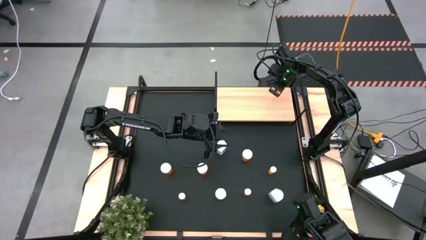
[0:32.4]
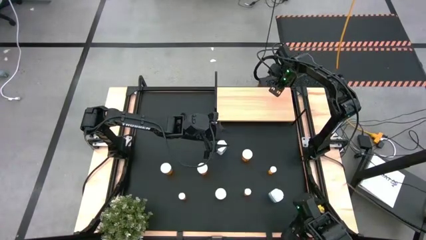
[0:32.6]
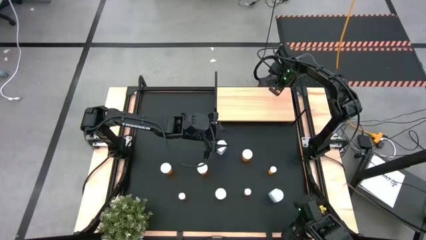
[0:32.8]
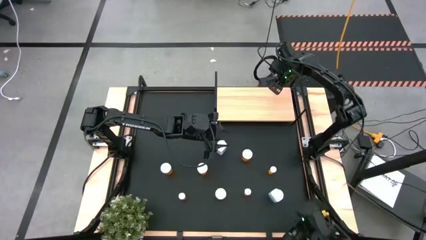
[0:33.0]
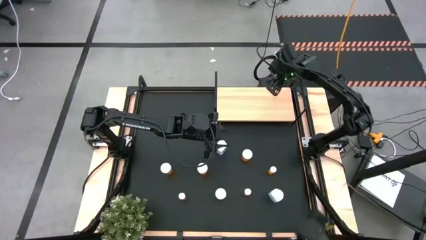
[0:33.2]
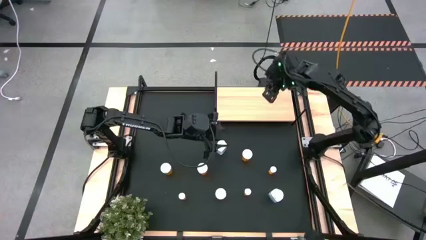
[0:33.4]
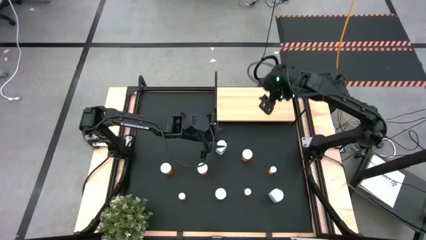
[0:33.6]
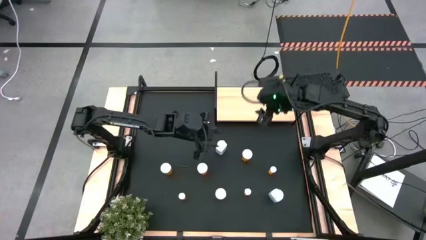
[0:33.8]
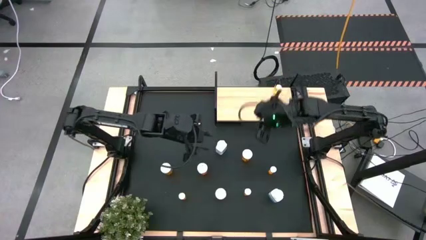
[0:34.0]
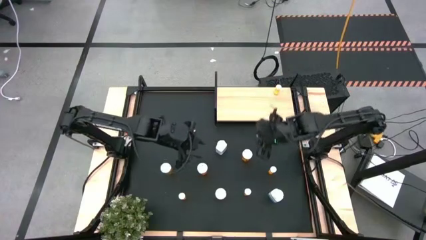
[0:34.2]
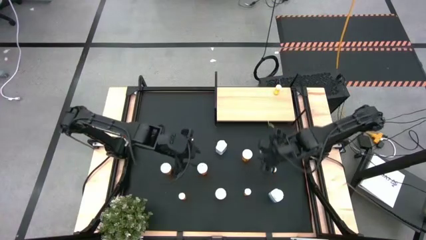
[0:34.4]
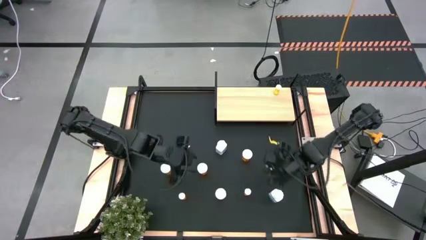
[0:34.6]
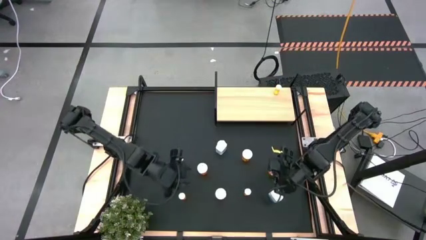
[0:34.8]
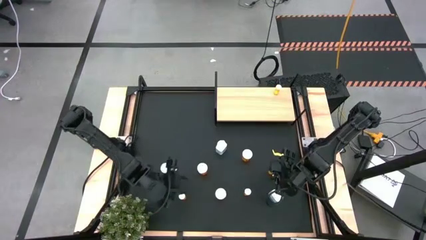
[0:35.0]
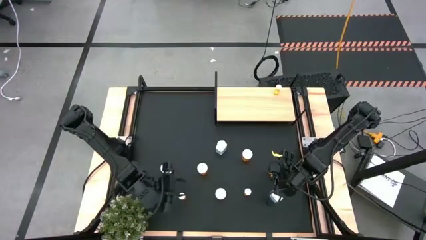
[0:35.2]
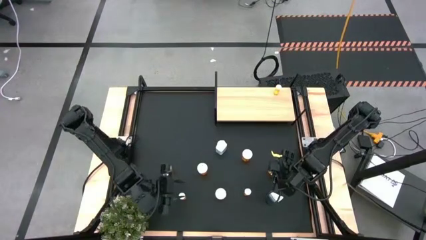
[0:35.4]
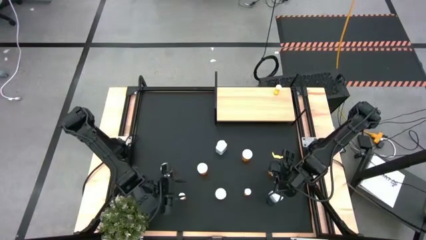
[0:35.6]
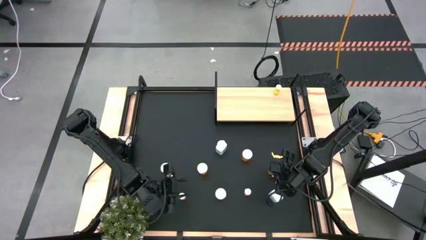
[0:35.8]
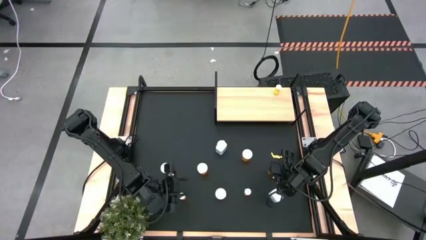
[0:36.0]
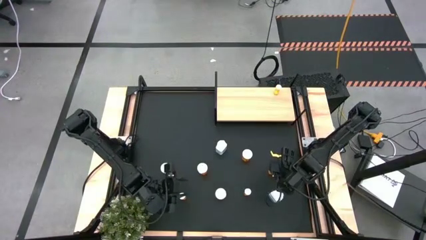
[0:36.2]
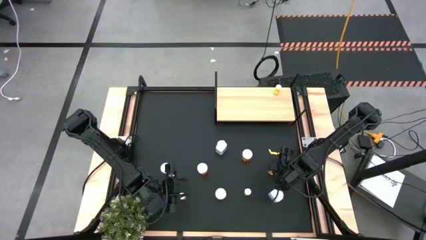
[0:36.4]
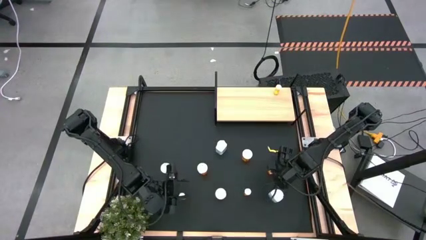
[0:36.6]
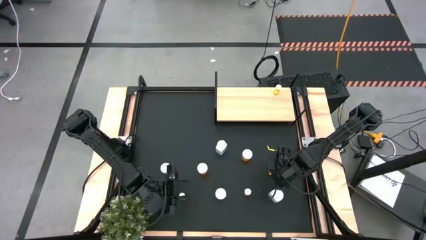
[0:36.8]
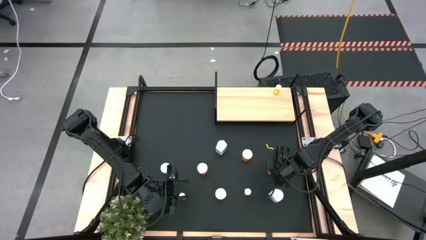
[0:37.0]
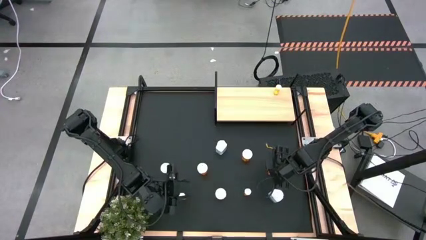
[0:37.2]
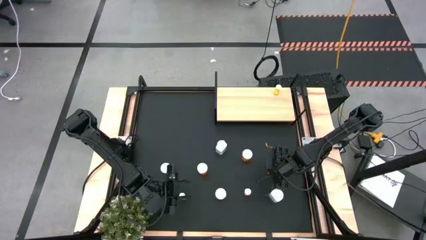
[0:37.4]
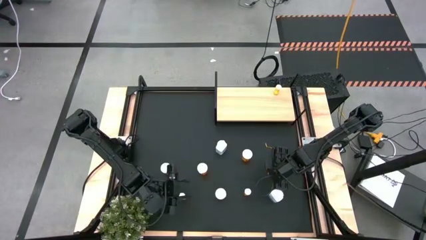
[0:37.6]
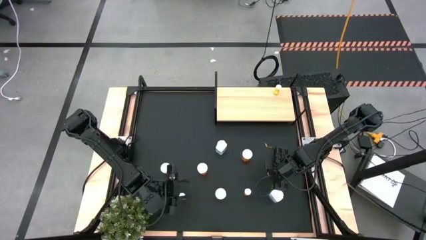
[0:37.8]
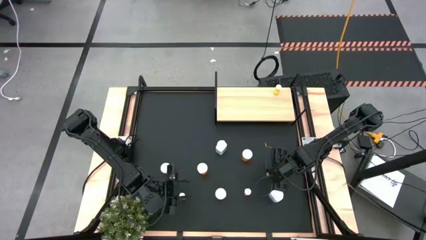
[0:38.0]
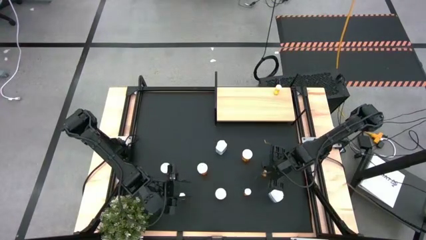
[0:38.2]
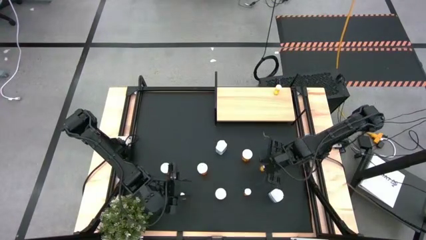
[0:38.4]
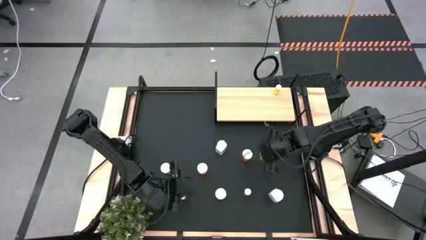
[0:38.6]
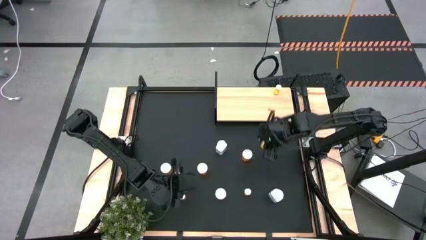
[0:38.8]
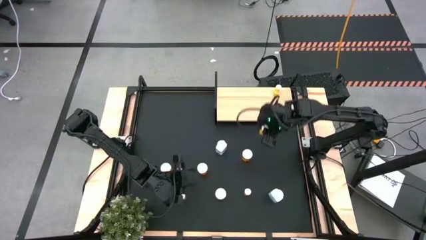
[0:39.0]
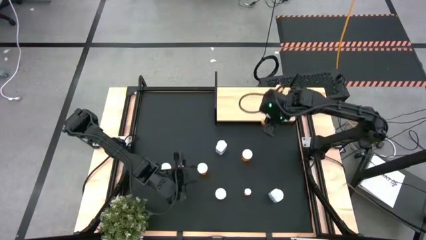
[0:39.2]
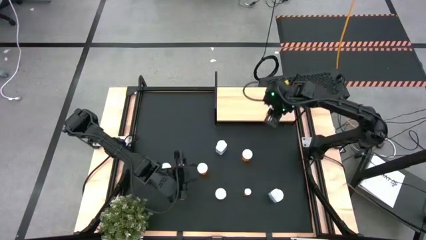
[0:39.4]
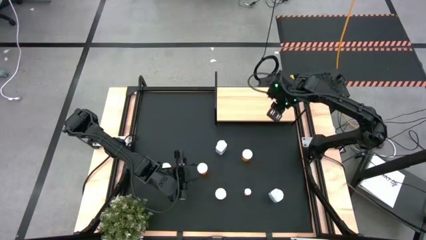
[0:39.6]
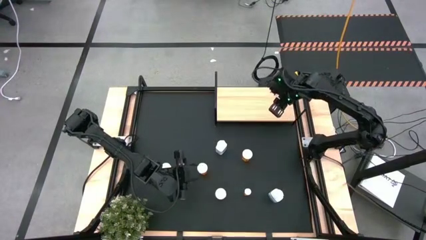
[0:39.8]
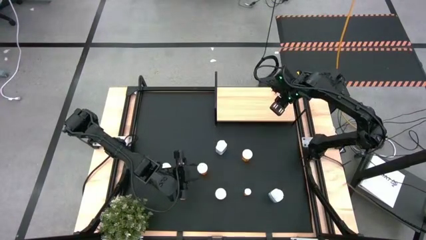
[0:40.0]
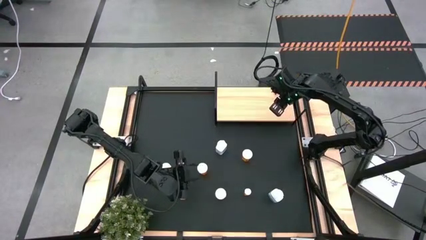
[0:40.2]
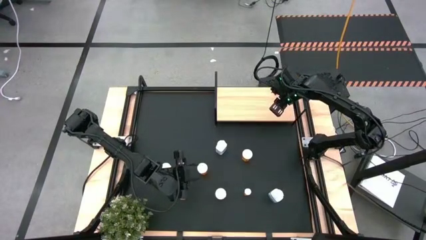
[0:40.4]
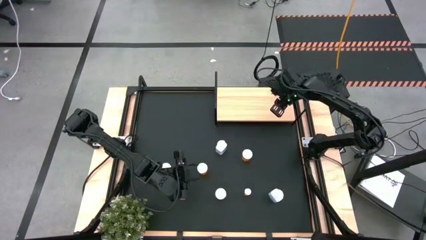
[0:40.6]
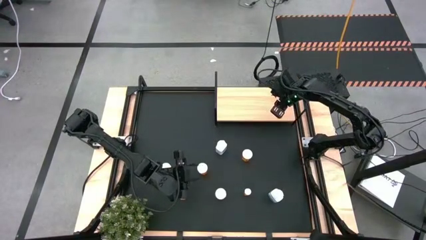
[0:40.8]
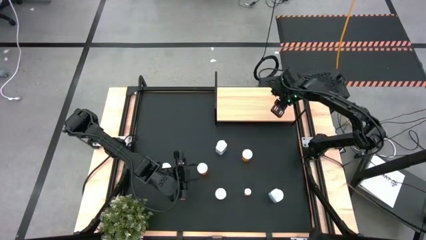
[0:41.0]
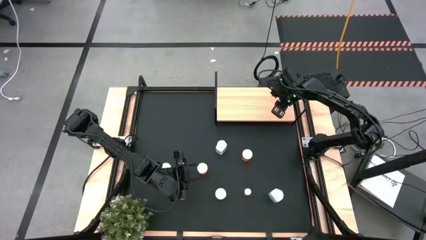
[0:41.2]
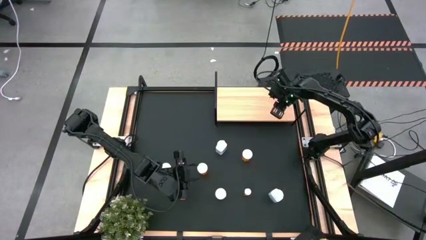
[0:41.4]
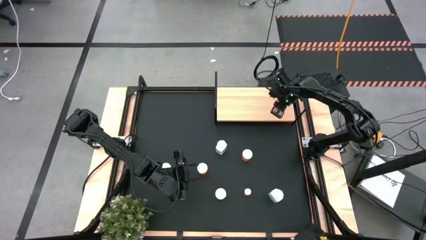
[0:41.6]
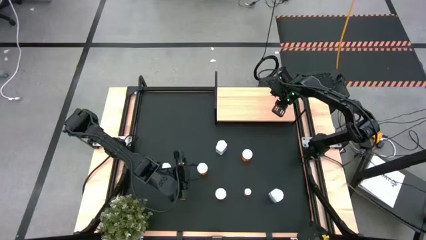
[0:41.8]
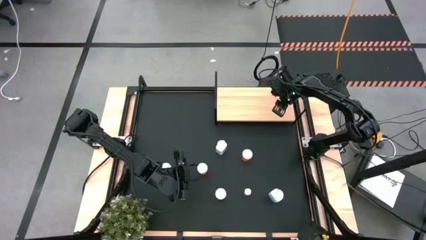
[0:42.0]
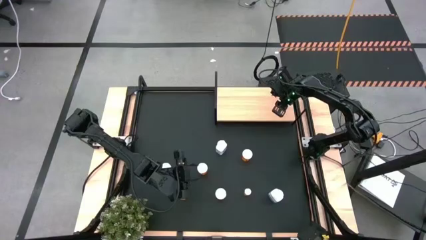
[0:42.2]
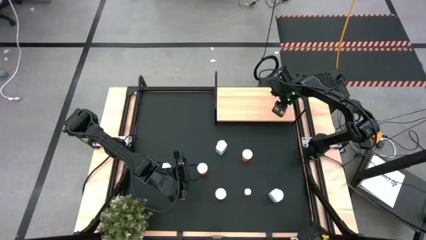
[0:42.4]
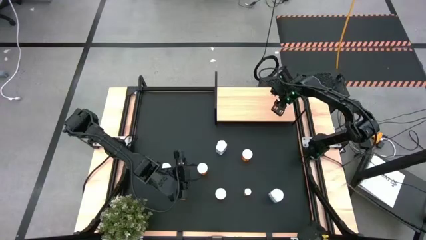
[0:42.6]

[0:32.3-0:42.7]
Task: Pick and place medicine bottles onto shelf by color
Put the small orange pill bottle on the shelf aligned with the other small orange pill bottle
